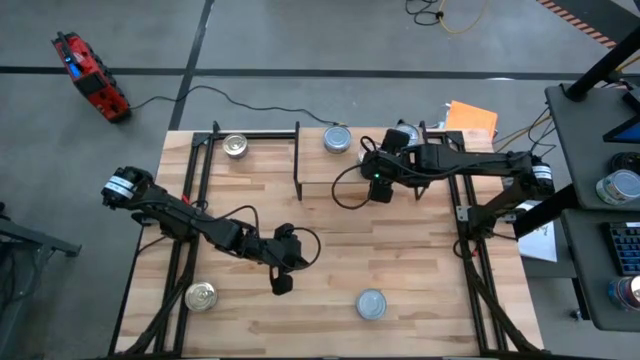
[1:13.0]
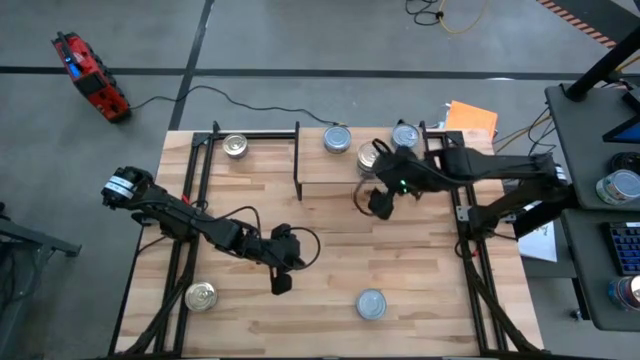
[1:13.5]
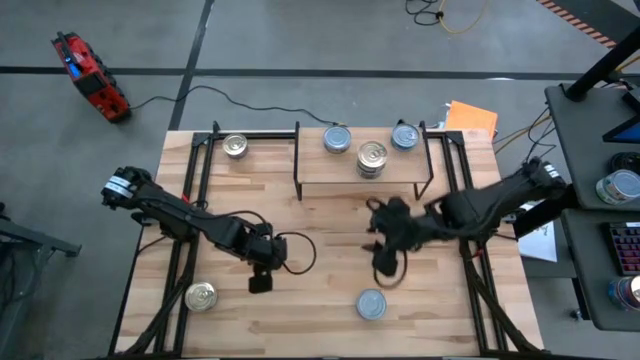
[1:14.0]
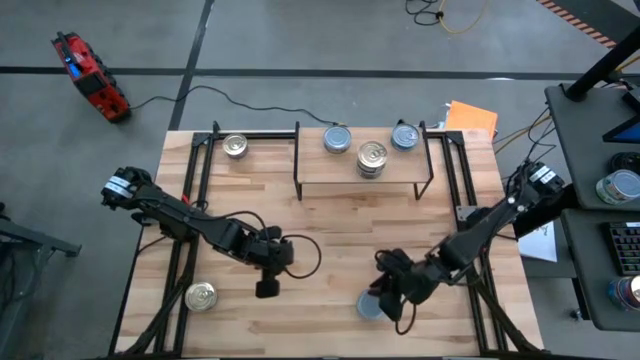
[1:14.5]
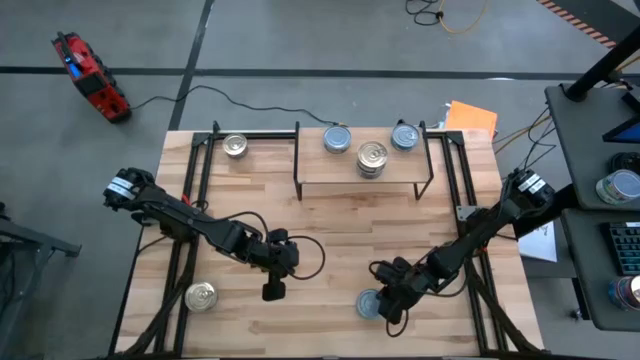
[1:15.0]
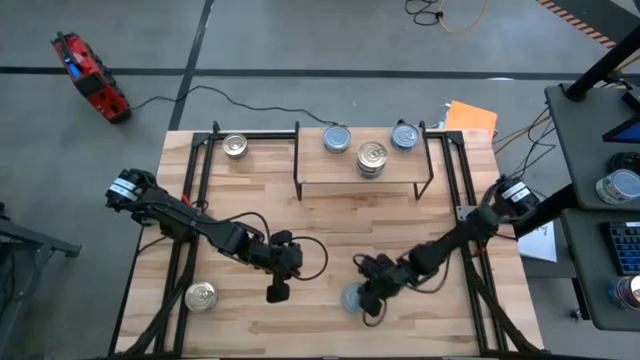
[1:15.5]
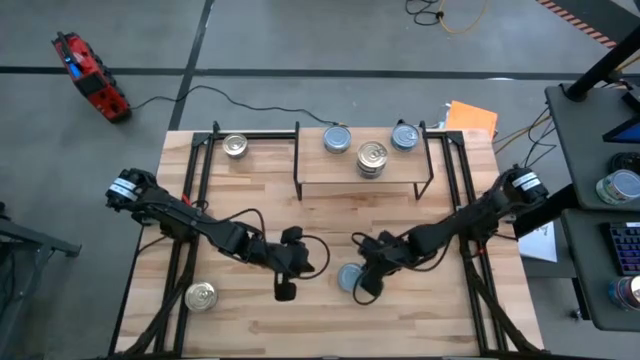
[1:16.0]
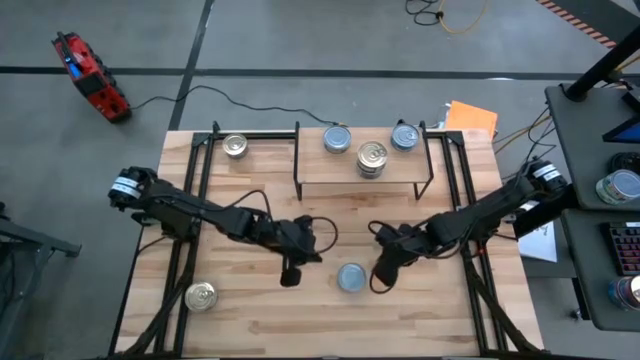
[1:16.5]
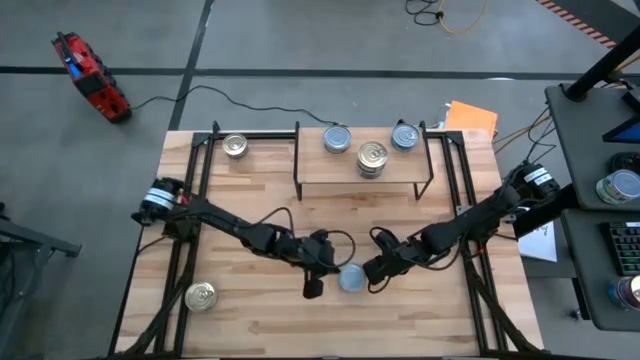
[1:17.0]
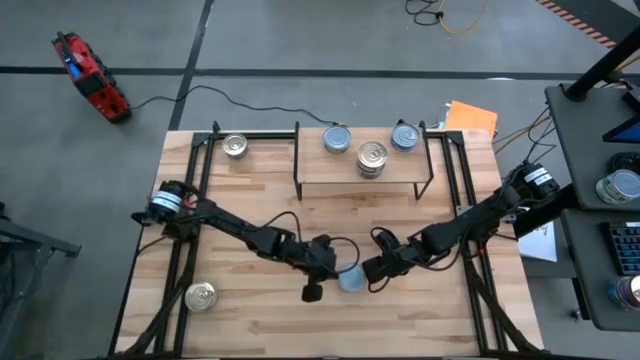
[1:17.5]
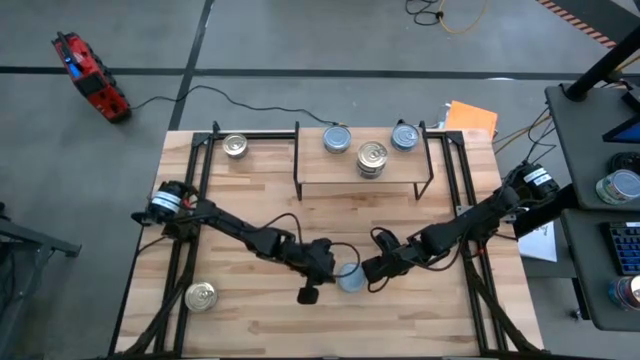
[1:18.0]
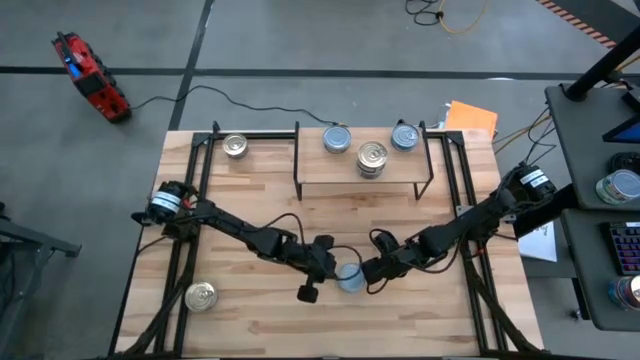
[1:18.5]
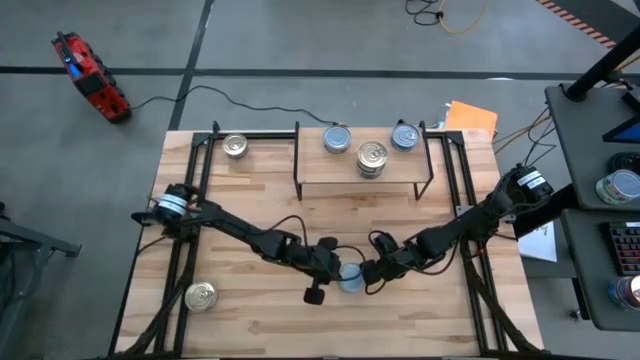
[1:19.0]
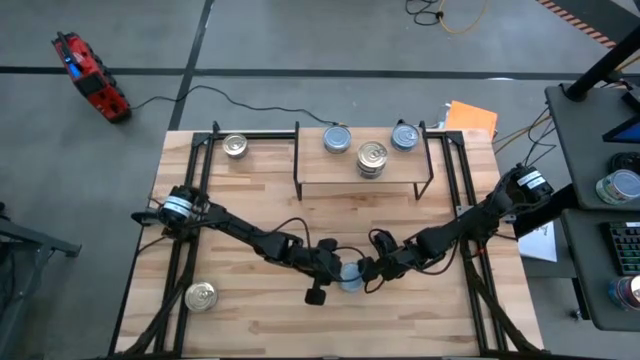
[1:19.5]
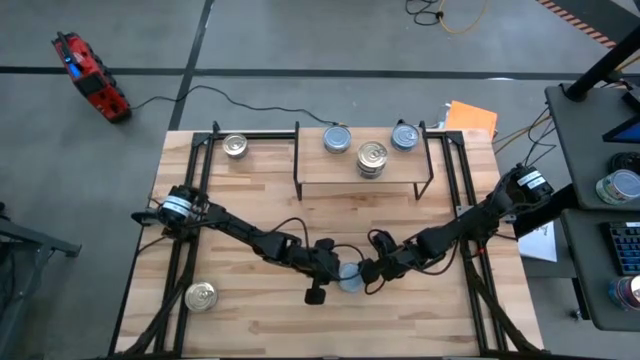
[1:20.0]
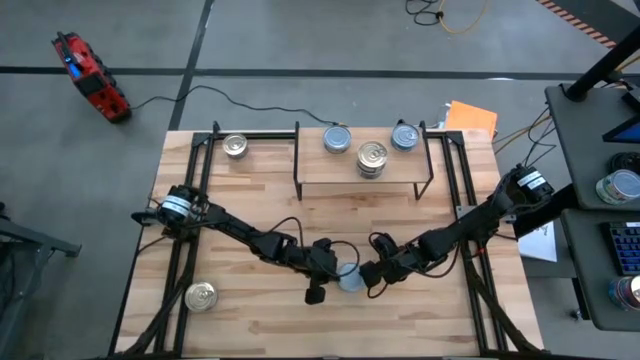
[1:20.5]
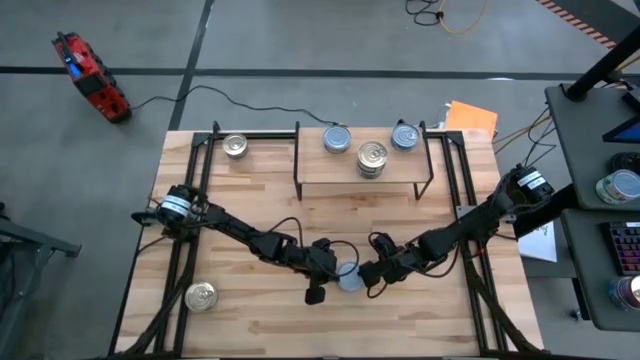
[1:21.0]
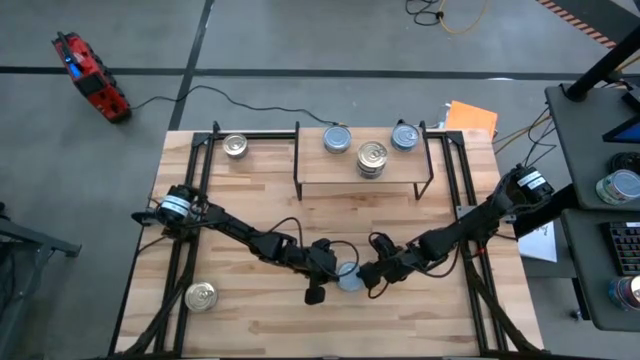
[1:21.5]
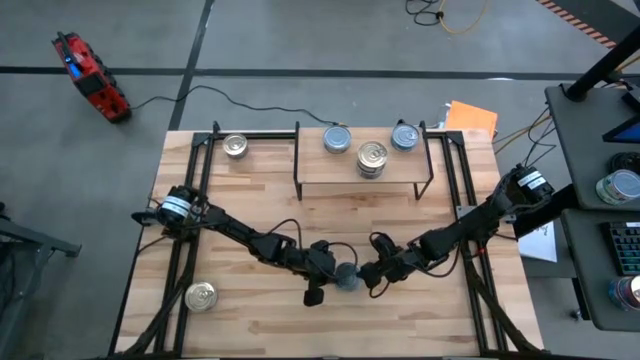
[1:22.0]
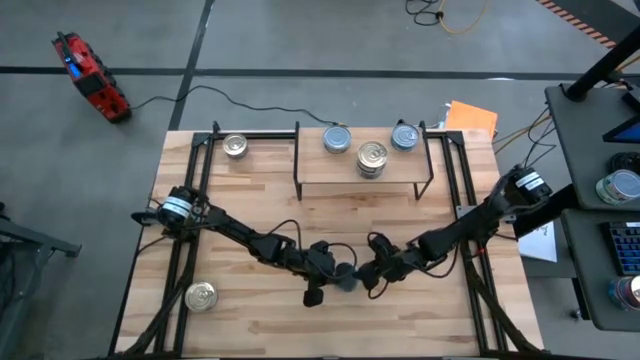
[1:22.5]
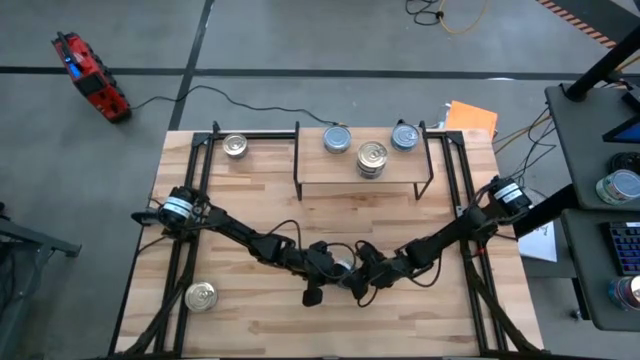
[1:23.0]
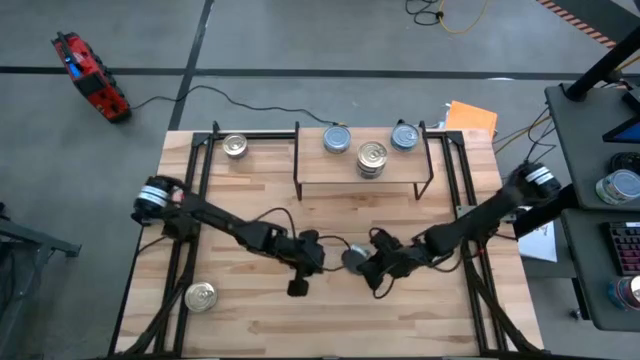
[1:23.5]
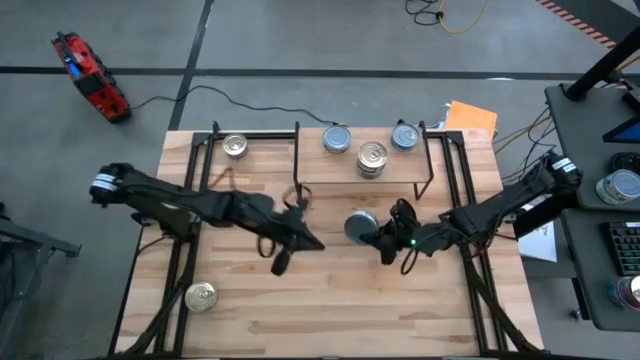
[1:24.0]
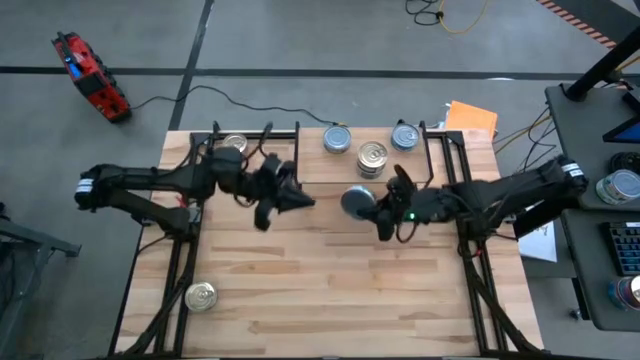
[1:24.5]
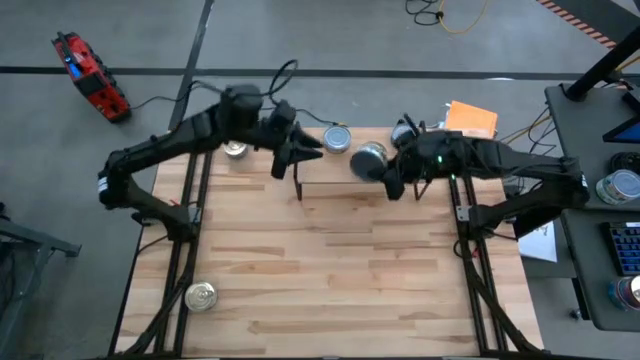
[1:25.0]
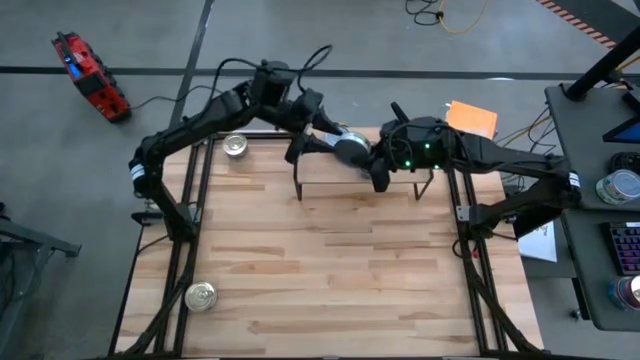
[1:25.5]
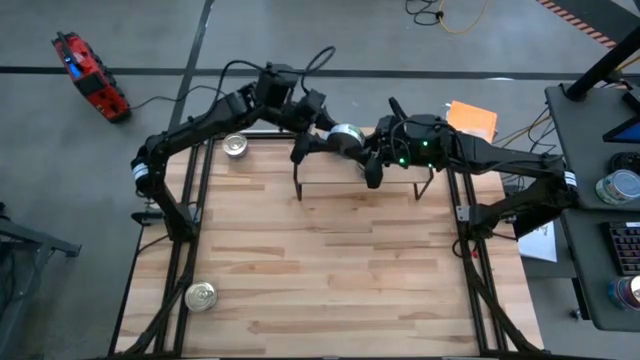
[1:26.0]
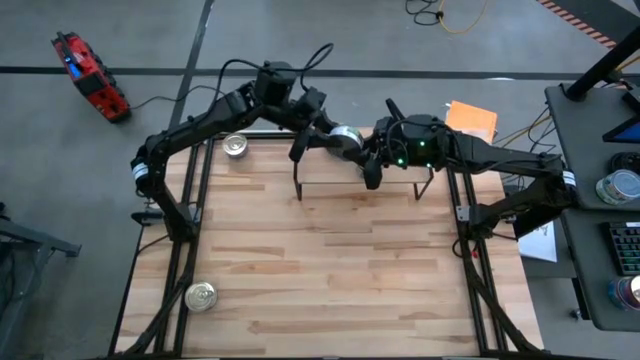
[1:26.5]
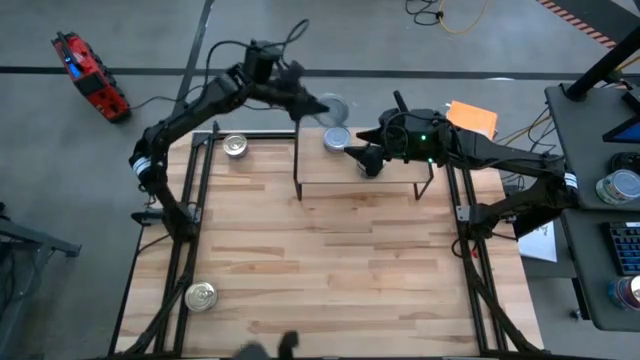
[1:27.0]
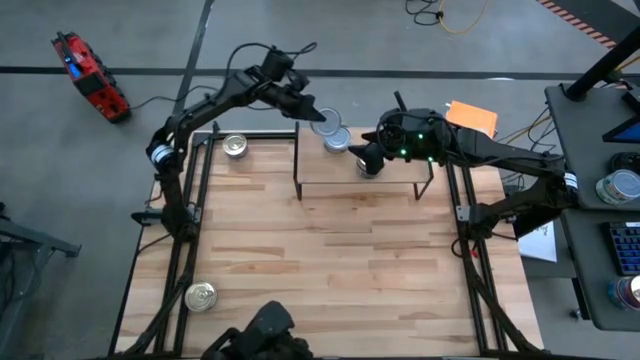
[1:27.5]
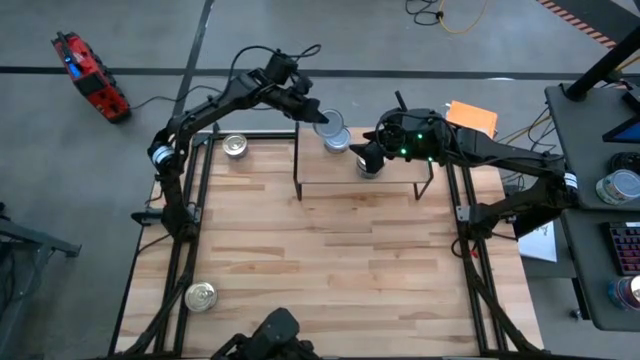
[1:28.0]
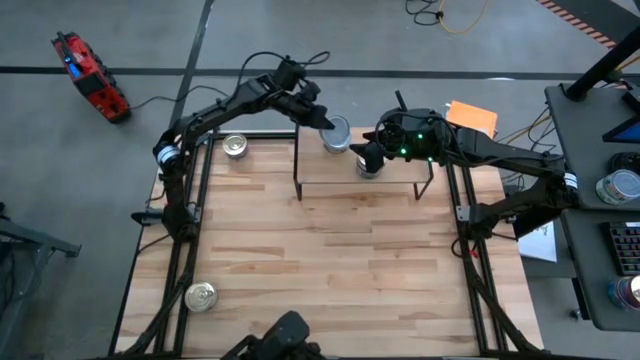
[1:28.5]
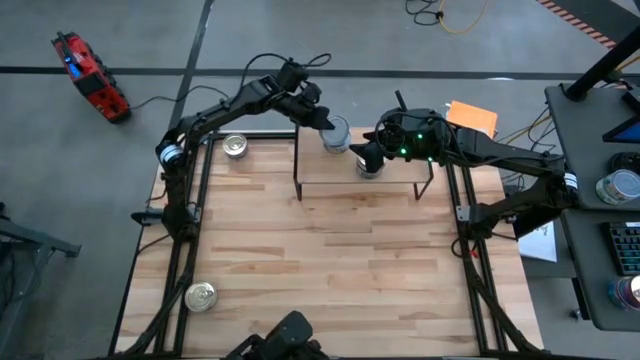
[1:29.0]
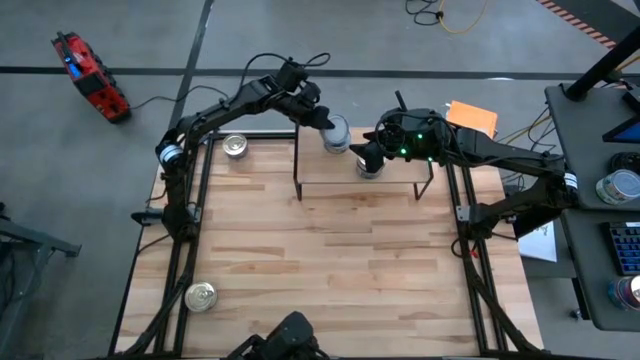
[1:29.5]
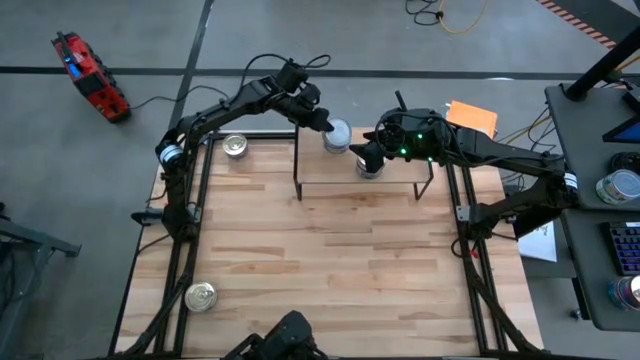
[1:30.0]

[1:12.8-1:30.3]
Task: Stack canned seafood by type on shelf
Stack the green tuna can on top of the other green tuna can

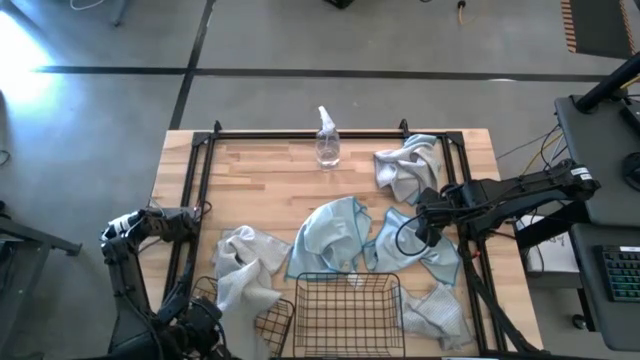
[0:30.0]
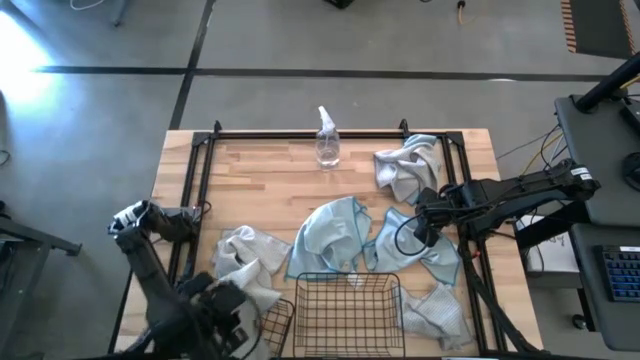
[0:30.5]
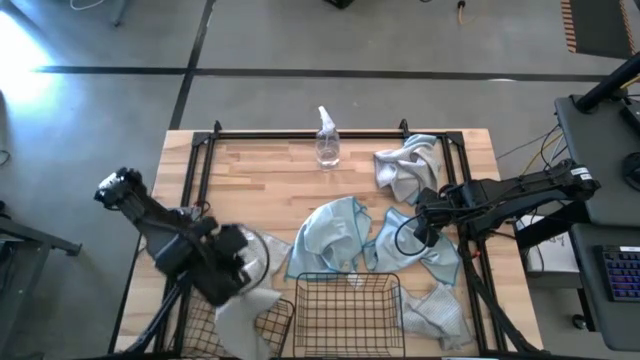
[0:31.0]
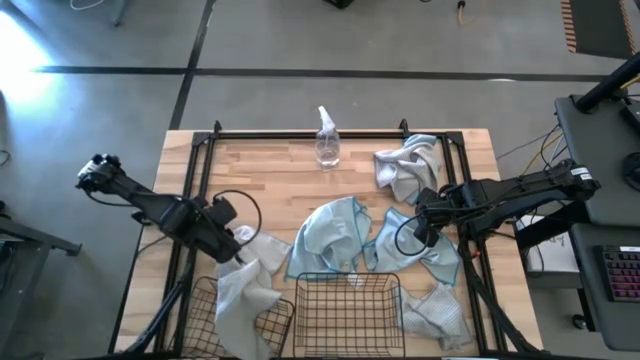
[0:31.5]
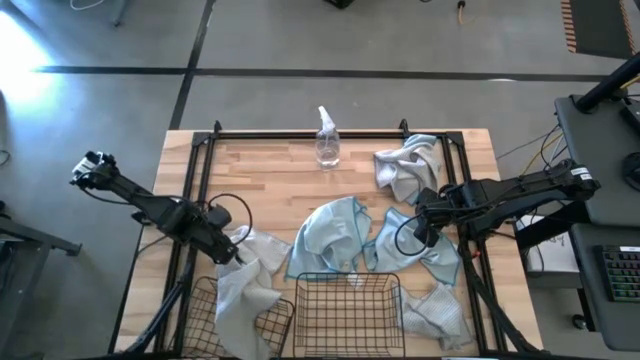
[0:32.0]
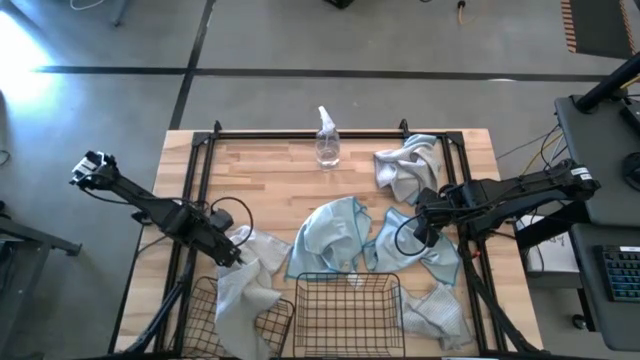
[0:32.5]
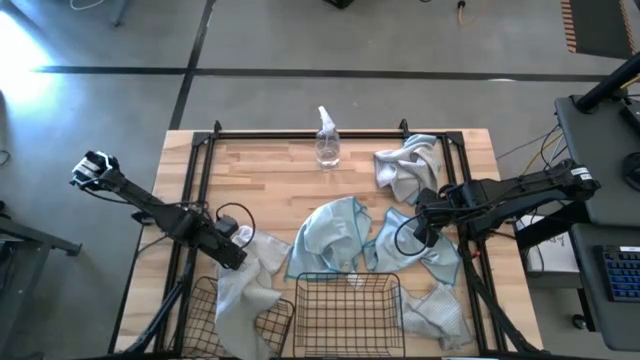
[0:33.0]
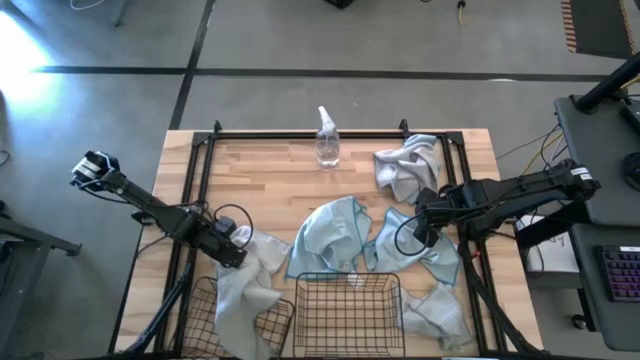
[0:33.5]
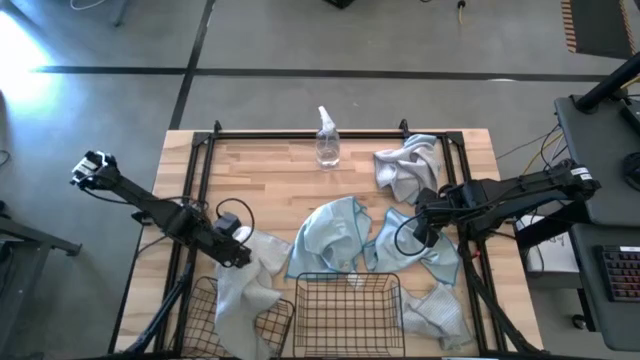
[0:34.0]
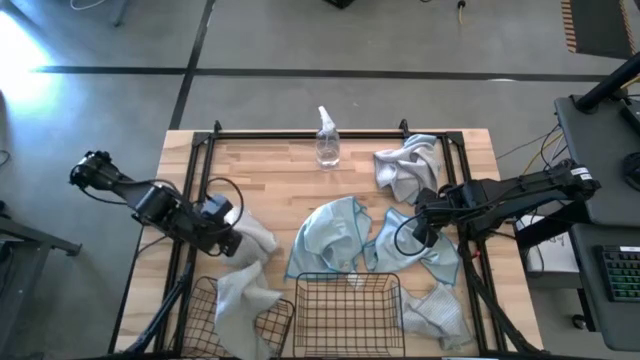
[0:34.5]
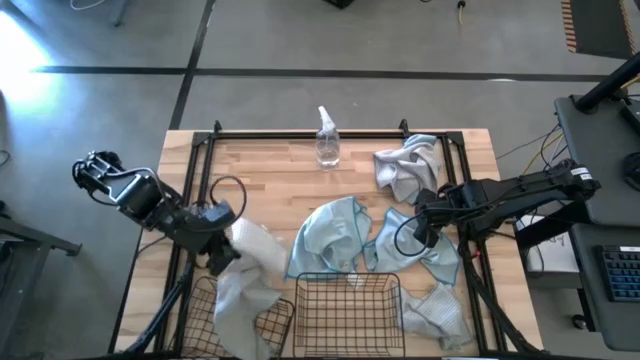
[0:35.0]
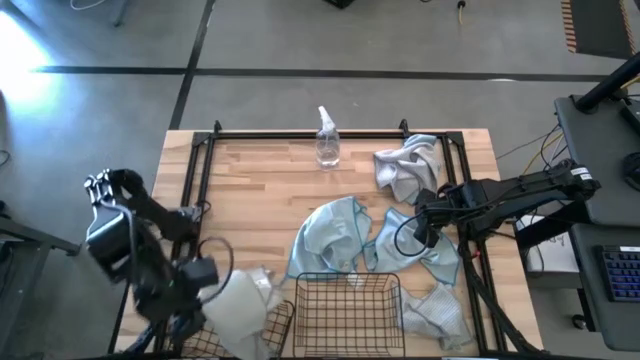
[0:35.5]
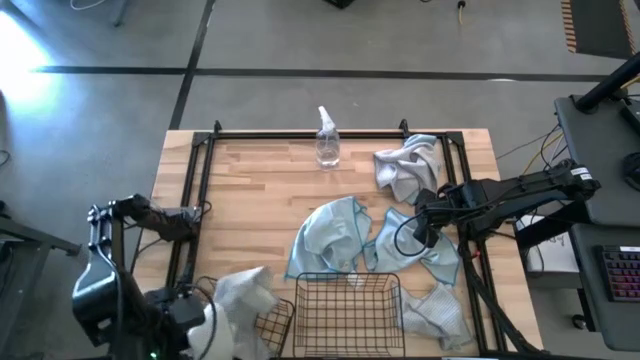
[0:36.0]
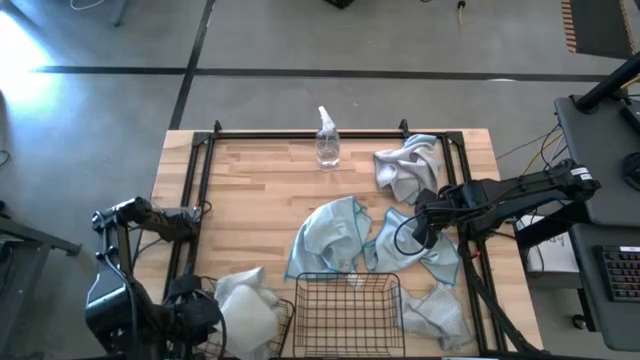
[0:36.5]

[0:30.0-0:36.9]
Task: Sort microfiber towel by color & place in baskets
Put the middle left gray microfiber towel into the left black wire basket
